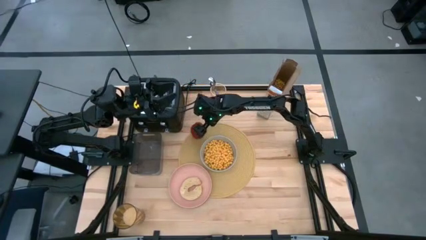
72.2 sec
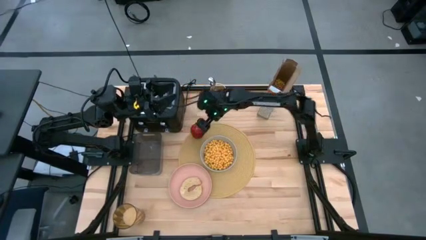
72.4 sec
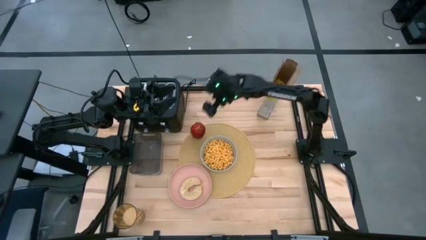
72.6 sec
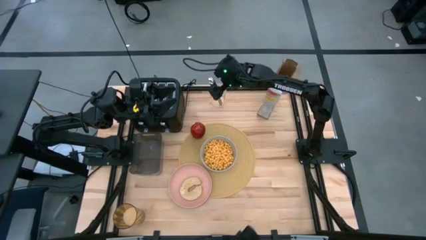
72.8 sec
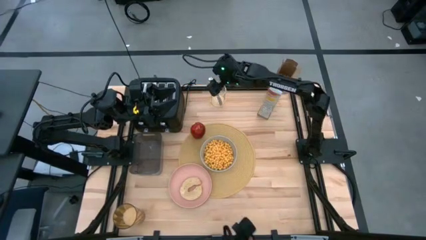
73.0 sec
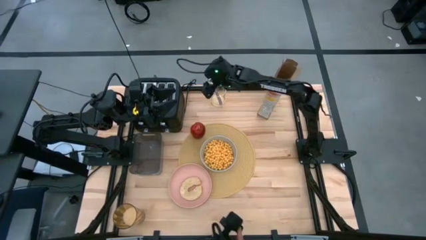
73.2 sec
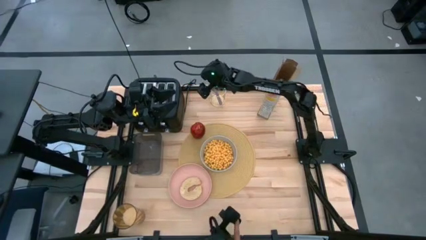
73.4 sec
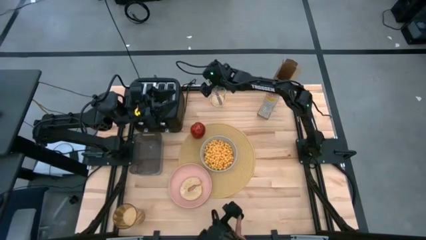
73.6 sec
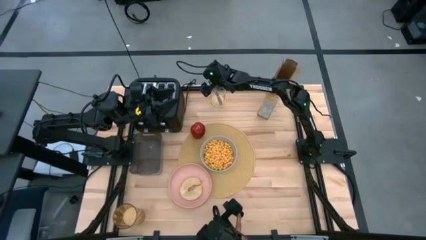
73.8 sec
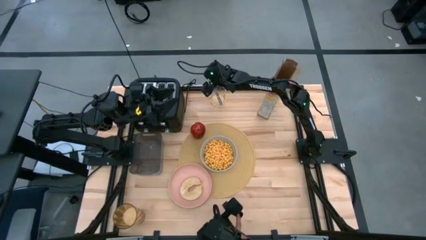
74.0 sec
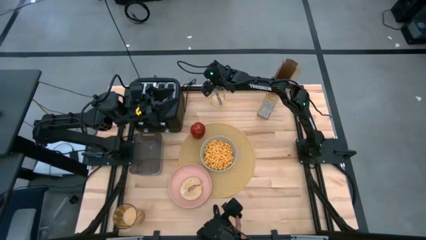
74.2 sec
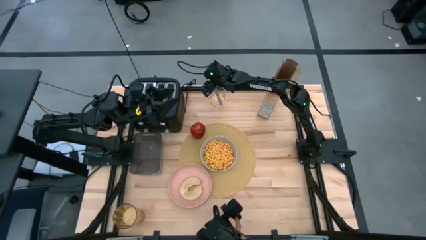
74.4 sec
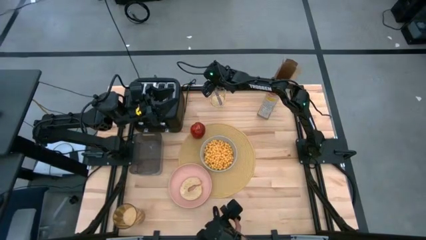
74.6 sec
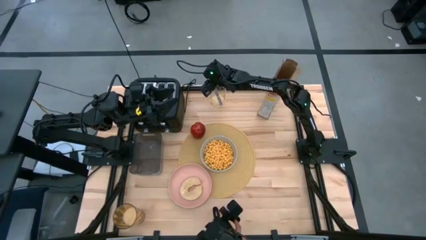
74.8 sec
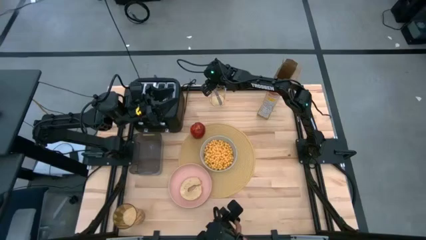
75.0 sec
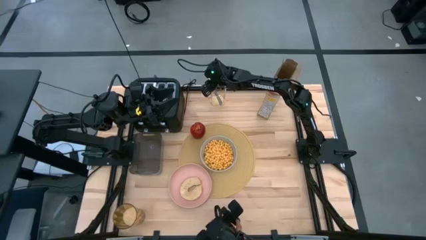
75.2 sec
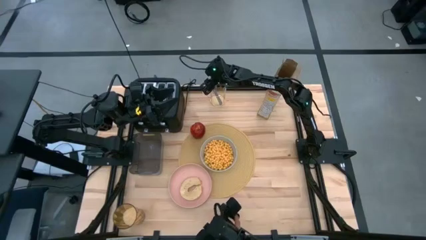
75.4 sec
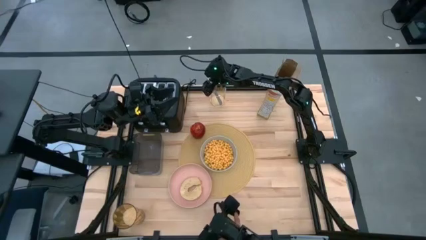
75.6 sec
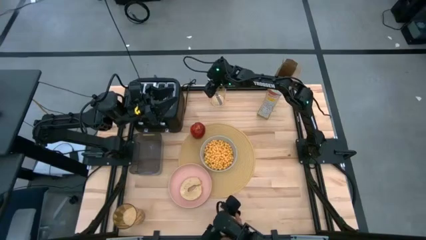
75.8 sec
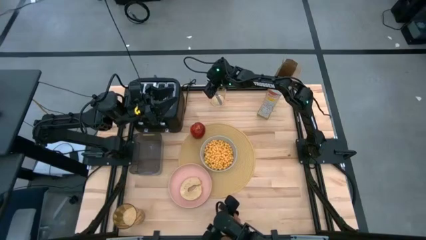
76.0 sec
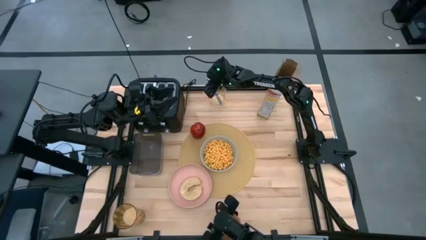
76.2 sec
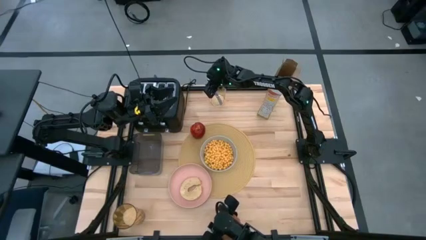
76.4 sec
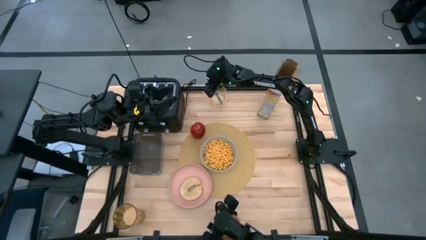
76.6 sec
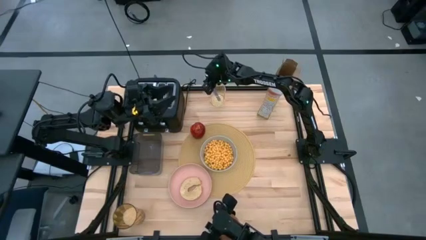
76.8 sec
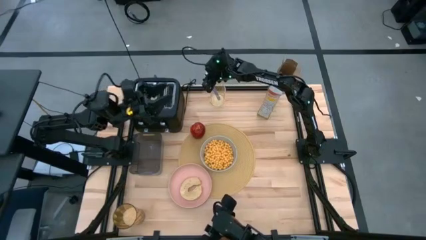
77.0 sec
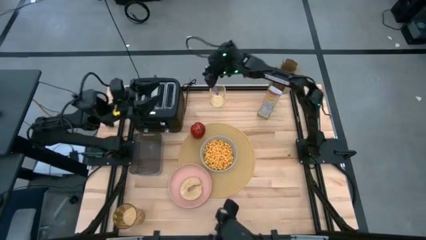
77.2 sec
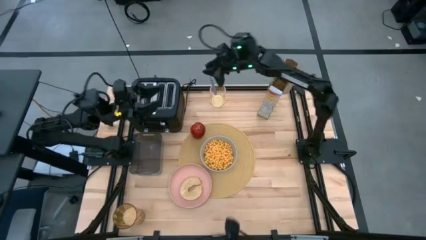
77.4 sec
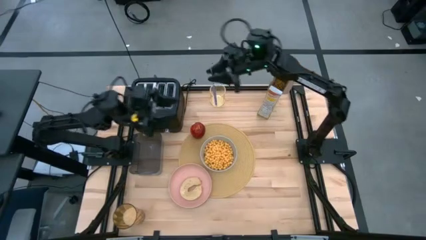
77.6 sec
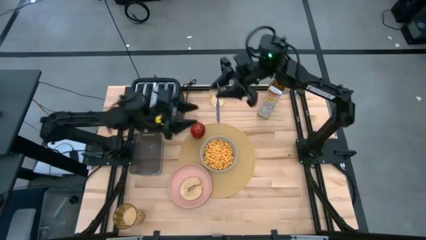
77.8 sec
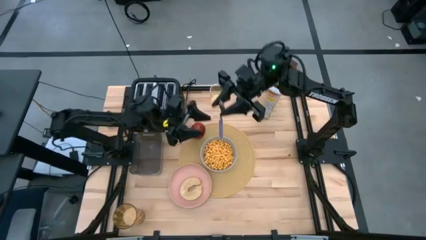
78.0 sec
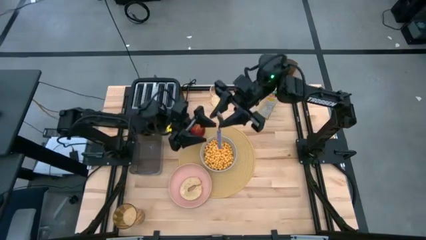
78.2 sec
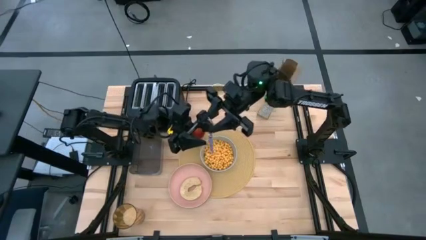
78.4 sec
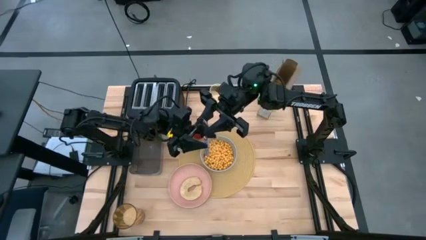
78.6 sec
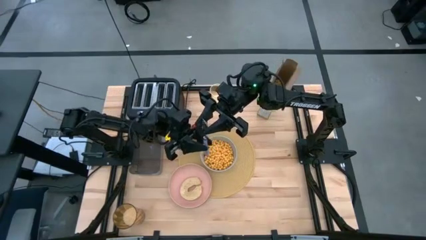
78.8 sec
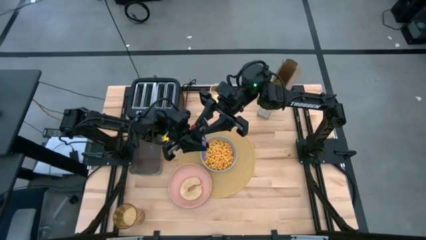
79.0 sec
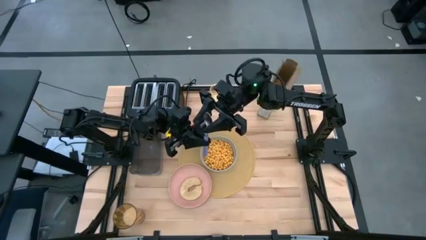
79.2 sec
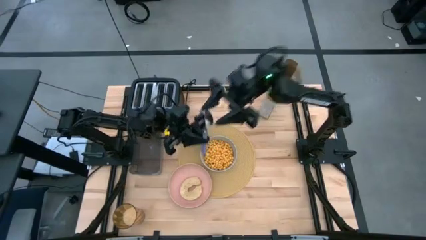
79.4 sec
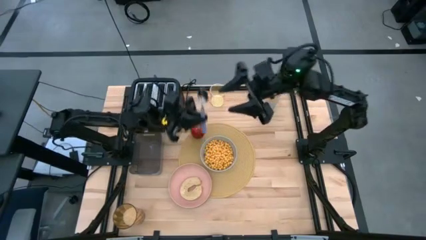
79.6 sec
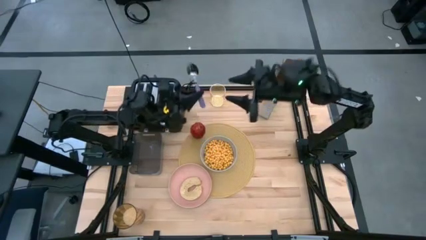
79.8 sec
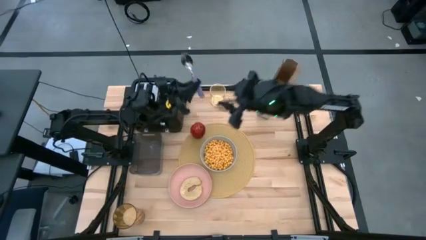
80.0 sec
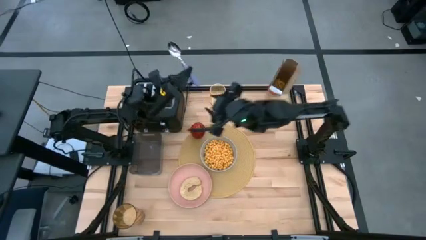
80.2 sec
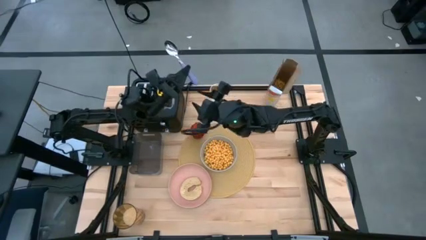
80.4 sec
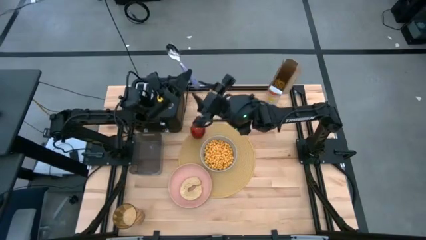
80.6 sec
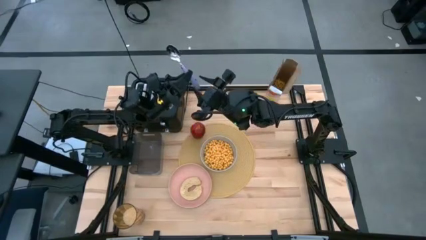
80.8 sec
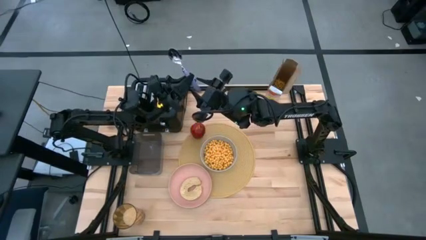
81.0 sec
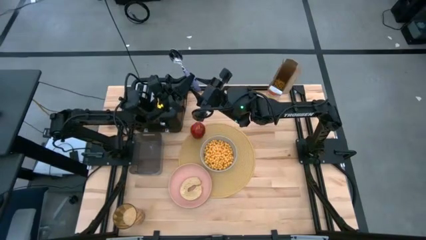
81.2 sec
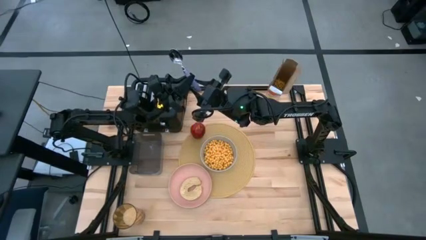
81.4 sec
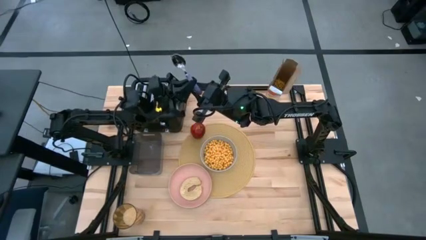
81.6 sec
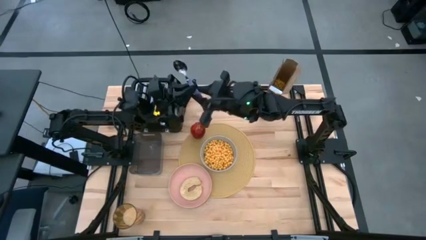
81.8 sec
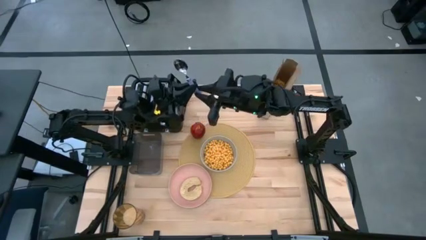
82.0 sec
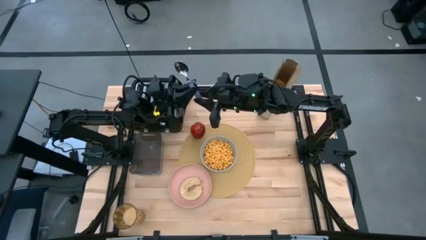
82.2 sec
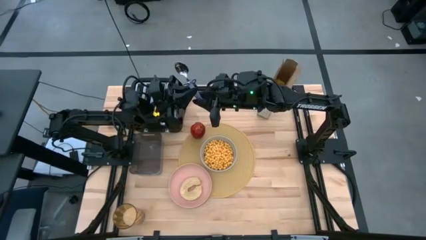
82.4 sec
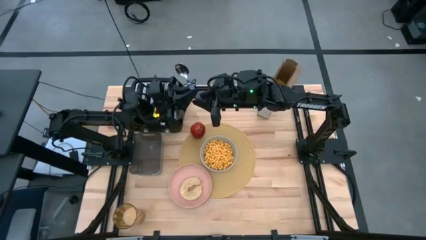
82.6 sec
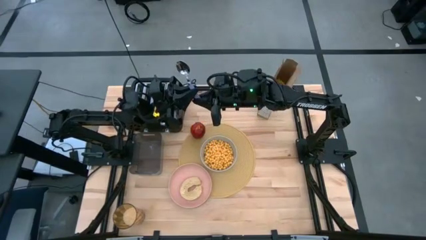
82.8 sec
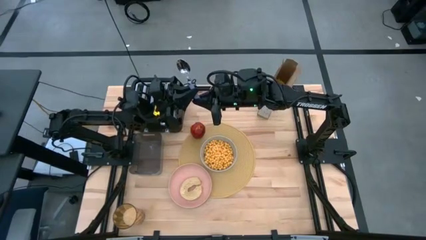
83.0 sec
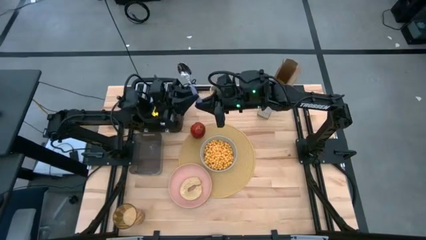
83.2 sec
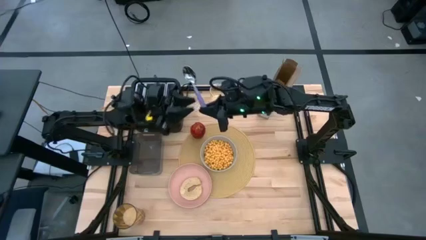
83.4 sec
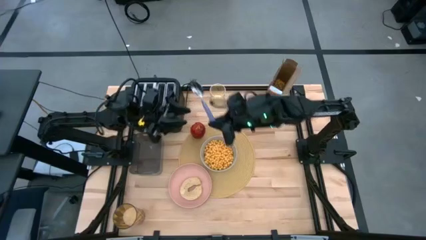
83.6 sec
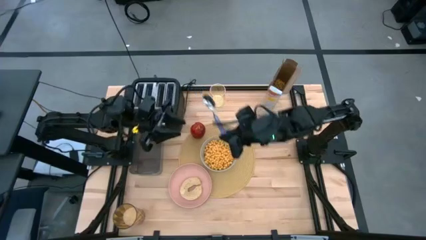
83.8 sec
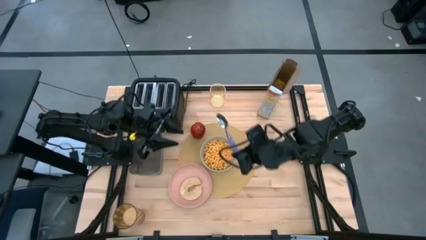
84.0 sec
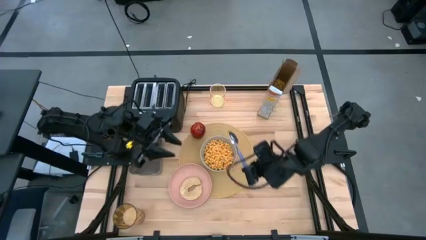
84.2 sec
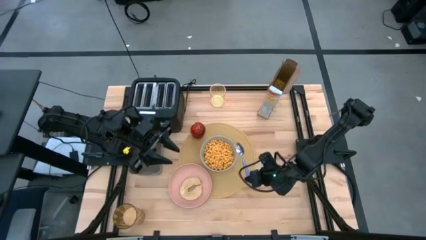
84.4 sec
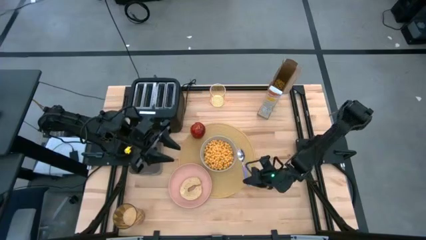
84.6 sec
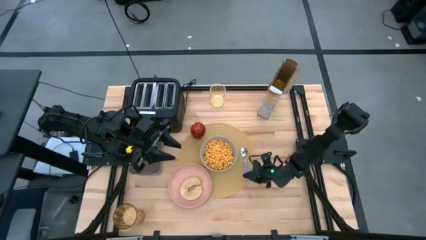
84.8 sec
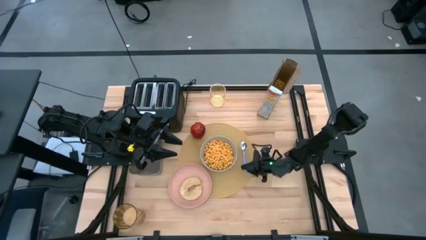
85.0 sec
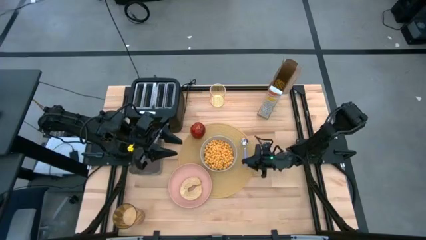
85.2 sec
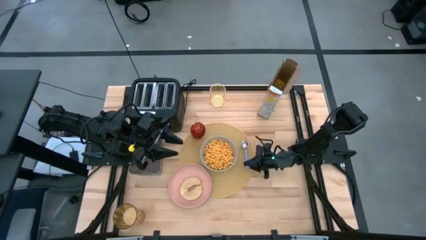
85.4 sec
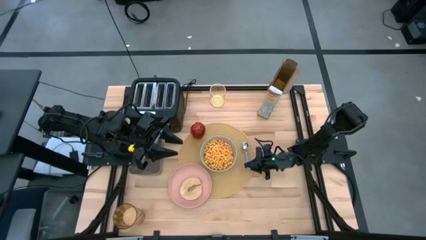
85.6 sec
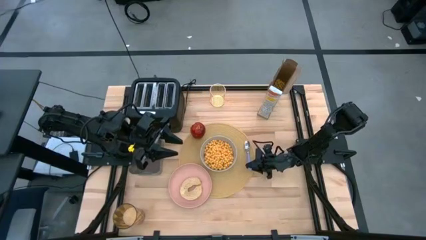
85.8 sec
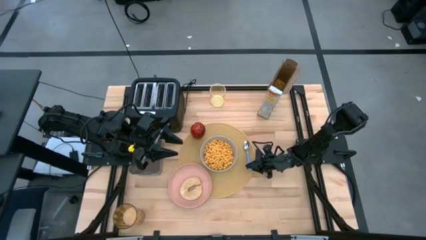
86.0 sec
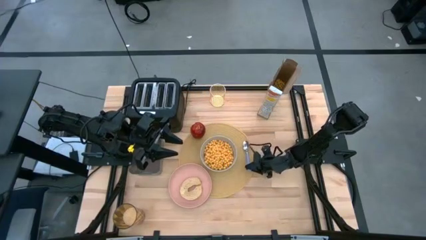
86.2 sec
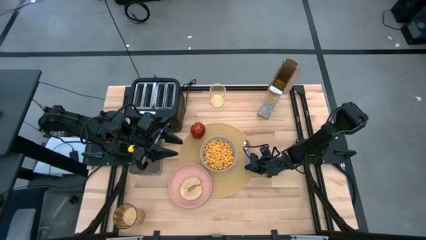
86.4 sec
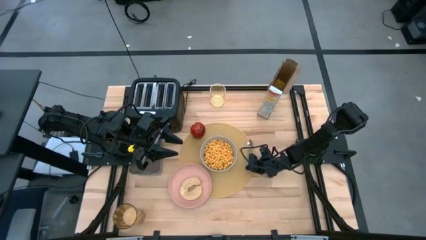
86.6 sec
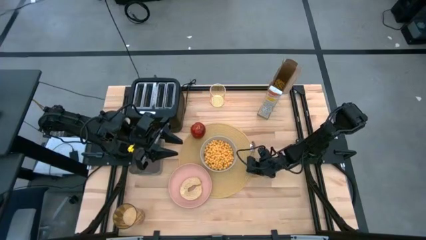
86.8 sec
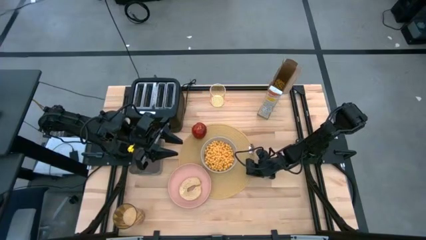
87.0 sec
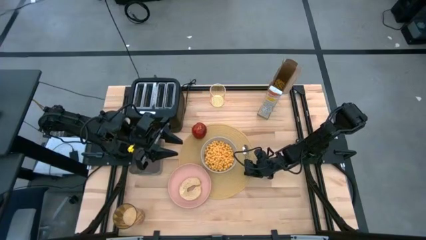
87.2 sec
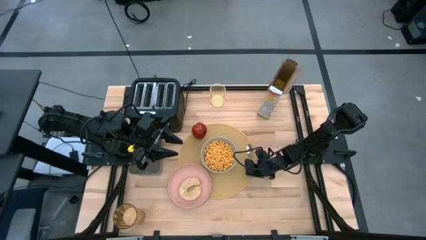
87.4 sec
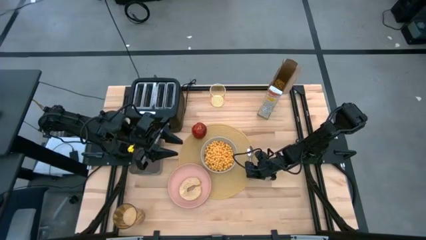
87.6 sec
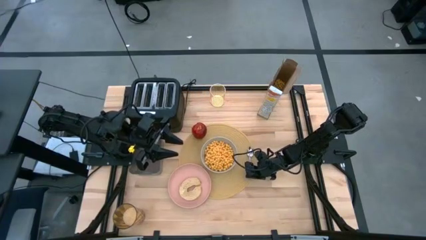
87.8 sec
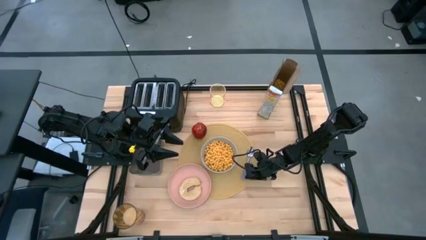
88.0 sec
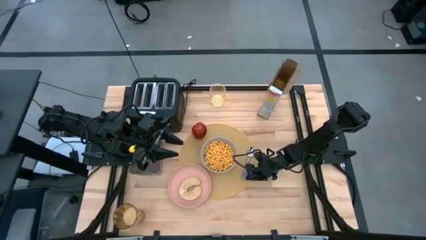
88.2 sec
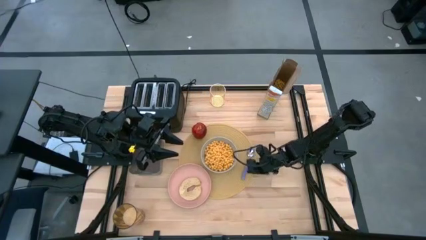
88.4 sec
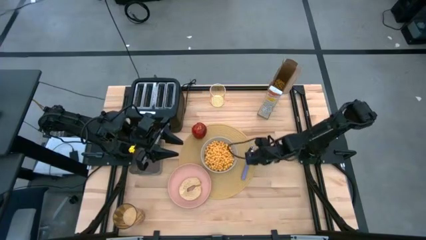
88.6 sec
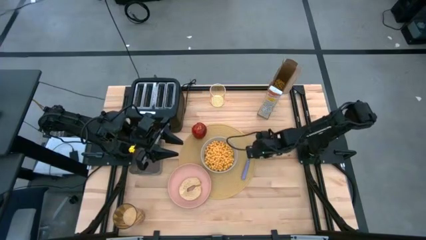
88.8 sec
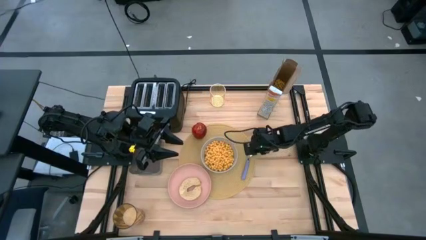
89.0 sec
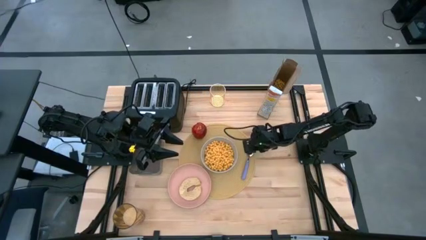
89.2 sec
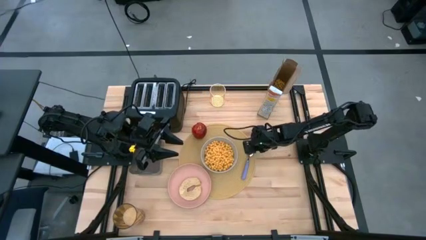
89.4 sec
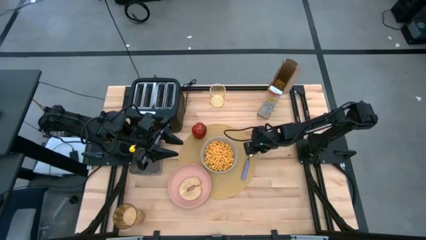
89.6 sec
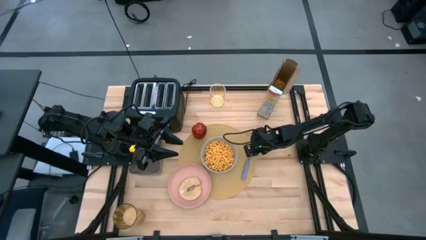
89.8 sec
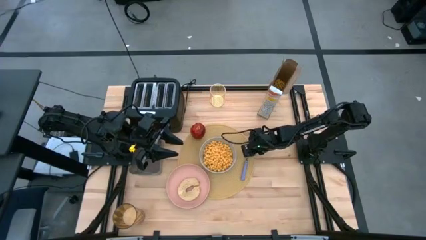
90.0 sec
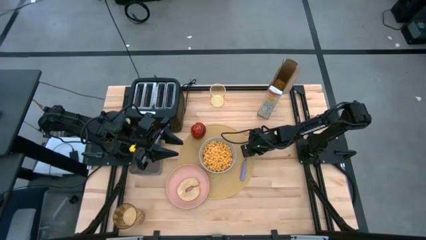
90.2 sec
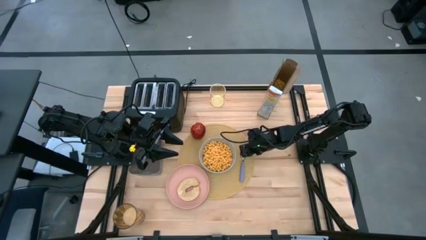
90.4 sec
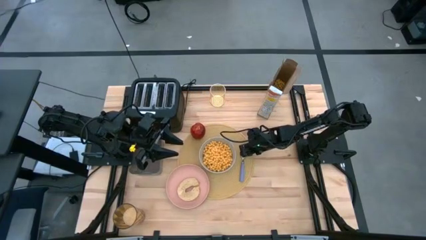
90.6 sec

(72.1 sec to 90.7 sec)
Task: Arrange a breakfast setting
Put the purple spoon on the table mat to the right of the gray bowl

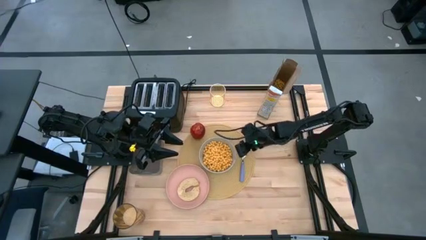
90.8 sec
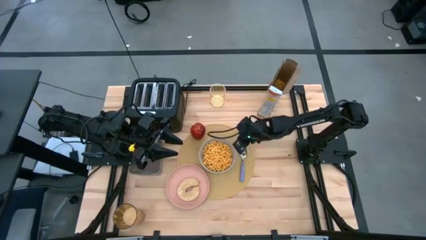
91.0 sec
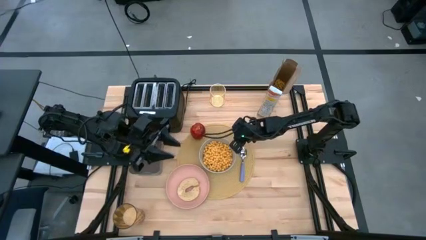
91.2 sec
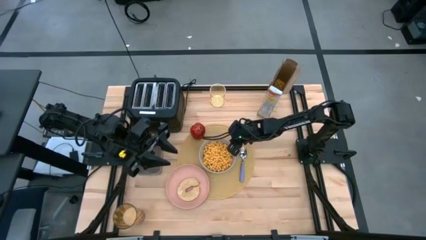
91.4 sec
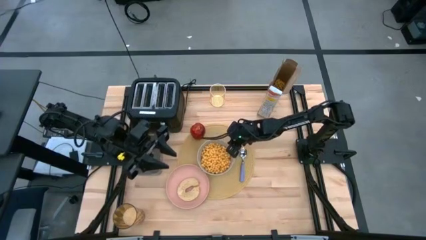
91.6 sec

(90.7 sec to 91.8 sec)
Adjust the gray bowl
